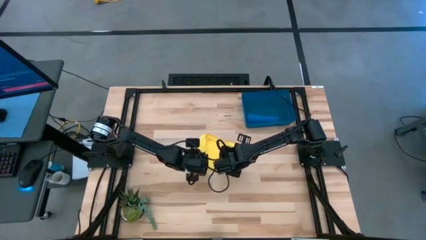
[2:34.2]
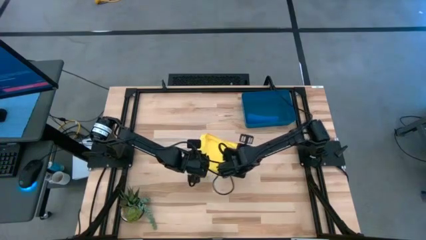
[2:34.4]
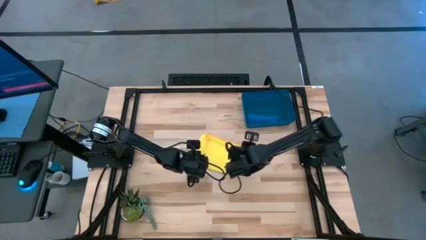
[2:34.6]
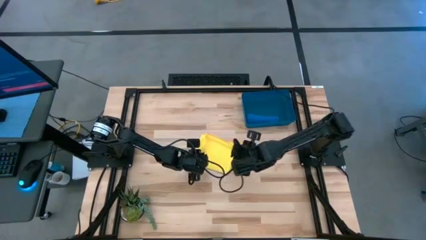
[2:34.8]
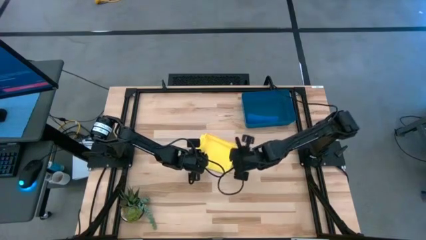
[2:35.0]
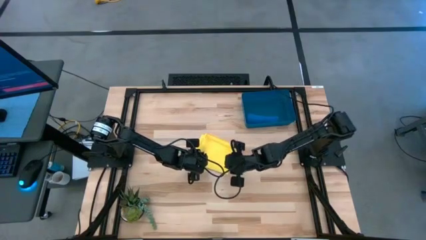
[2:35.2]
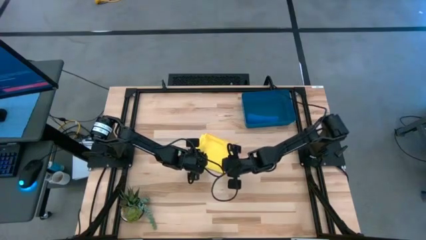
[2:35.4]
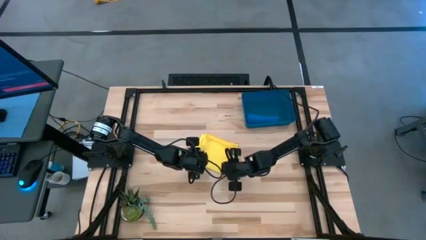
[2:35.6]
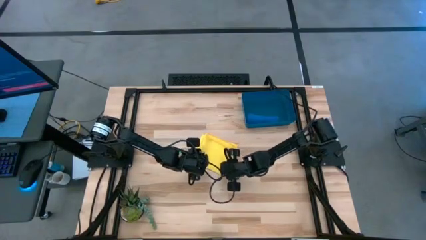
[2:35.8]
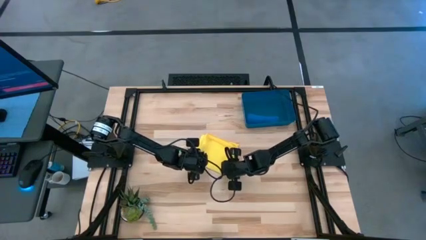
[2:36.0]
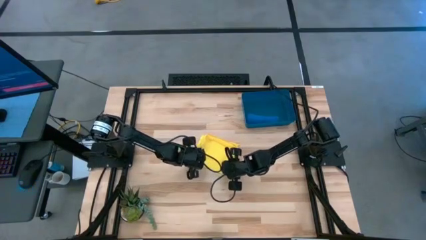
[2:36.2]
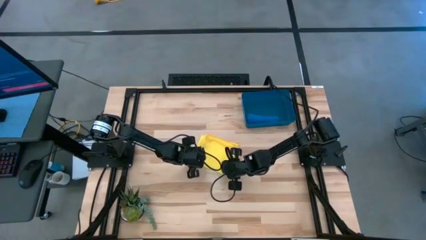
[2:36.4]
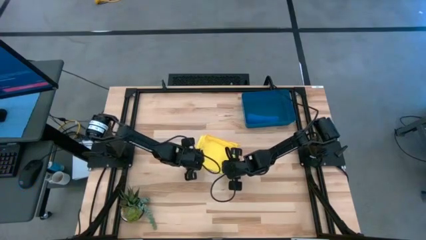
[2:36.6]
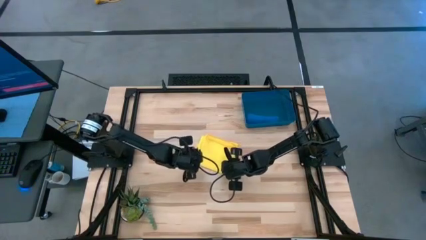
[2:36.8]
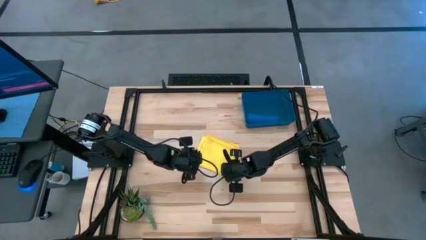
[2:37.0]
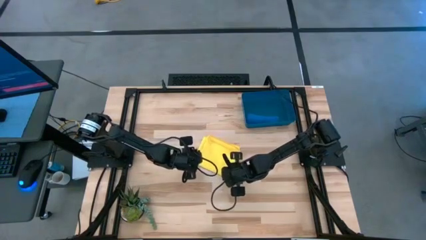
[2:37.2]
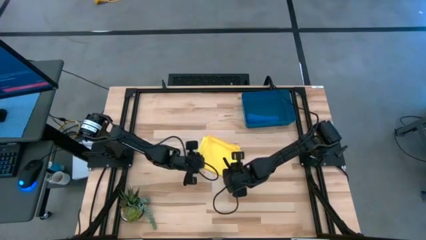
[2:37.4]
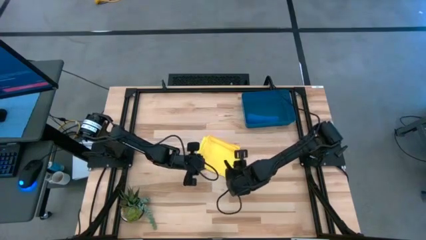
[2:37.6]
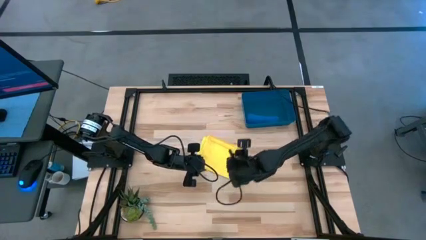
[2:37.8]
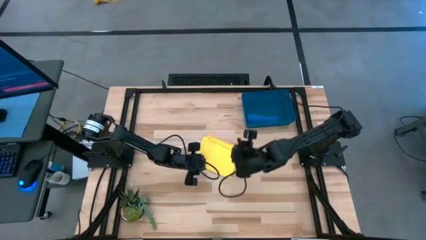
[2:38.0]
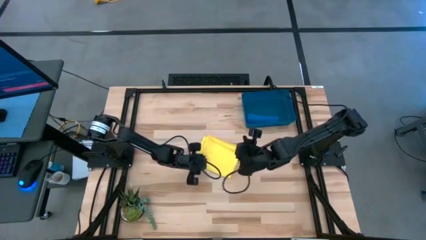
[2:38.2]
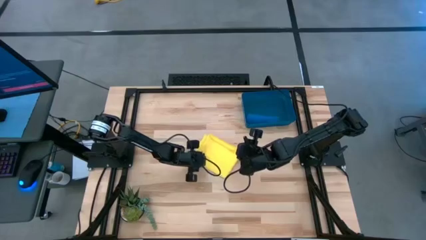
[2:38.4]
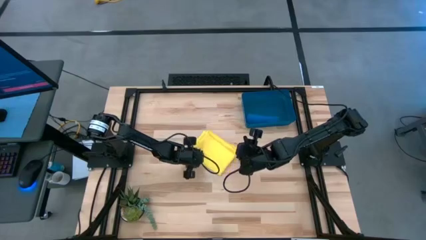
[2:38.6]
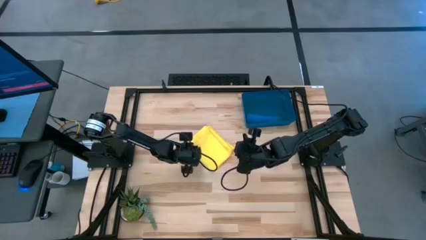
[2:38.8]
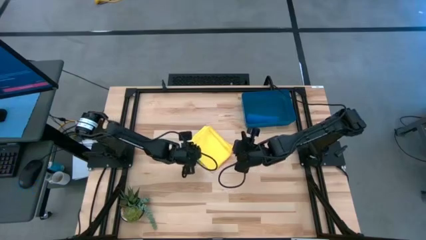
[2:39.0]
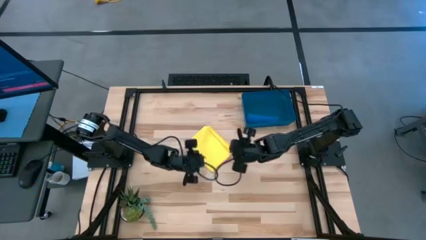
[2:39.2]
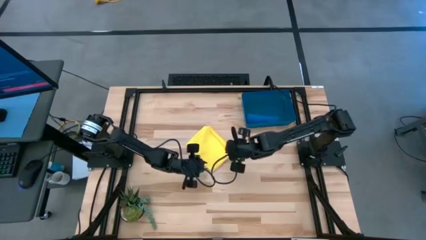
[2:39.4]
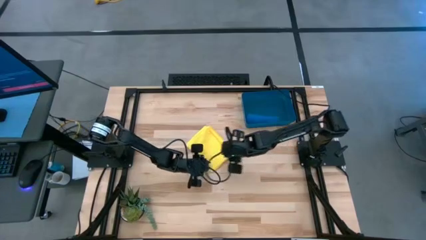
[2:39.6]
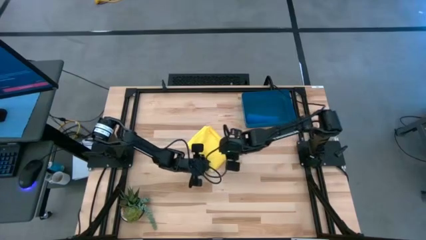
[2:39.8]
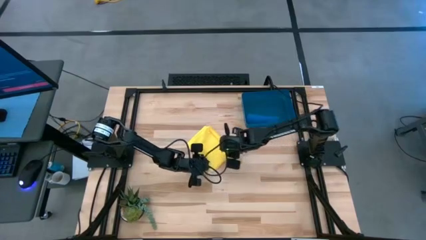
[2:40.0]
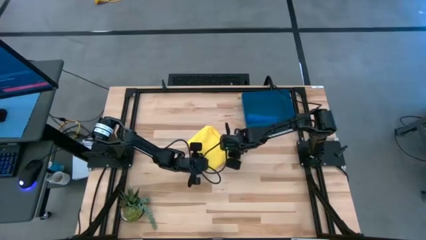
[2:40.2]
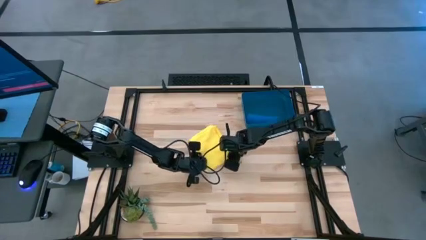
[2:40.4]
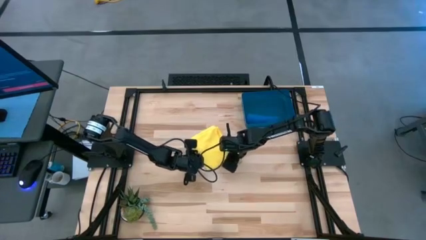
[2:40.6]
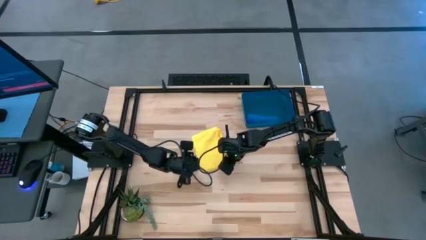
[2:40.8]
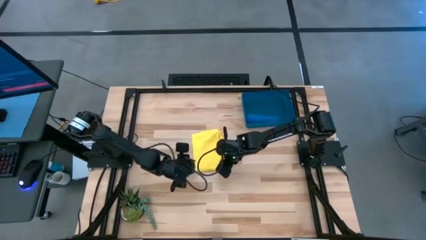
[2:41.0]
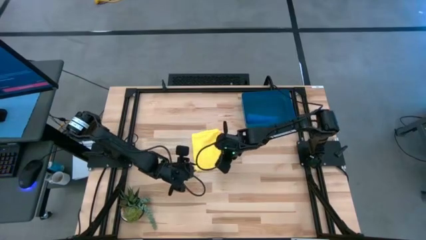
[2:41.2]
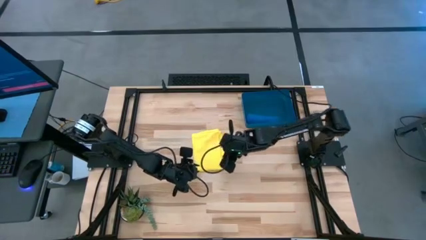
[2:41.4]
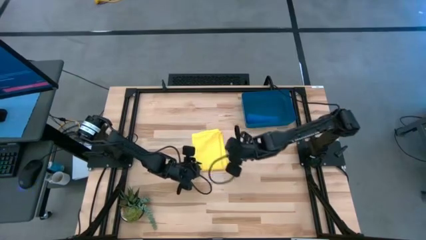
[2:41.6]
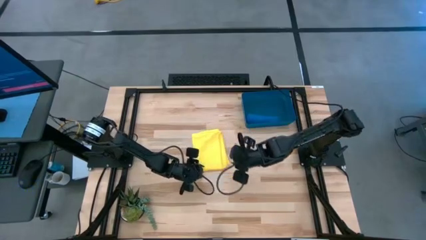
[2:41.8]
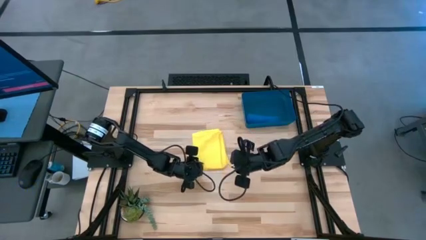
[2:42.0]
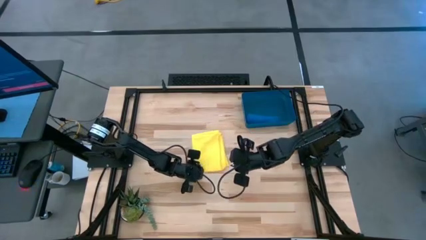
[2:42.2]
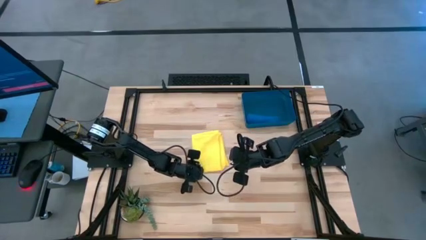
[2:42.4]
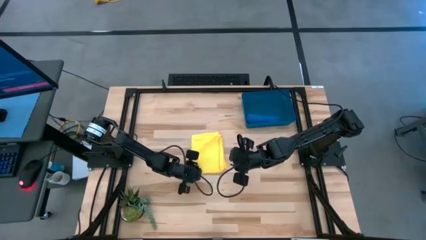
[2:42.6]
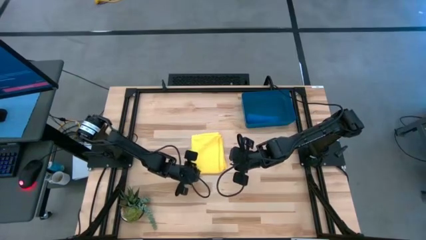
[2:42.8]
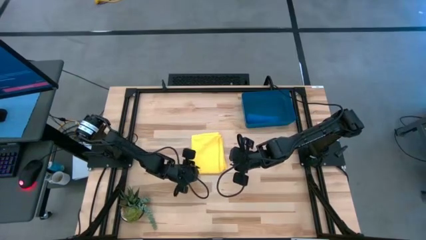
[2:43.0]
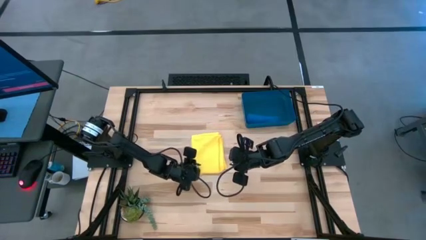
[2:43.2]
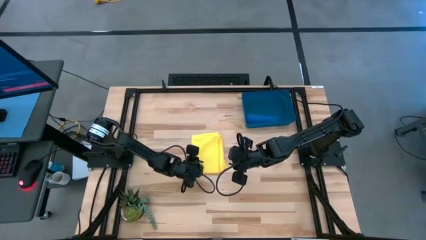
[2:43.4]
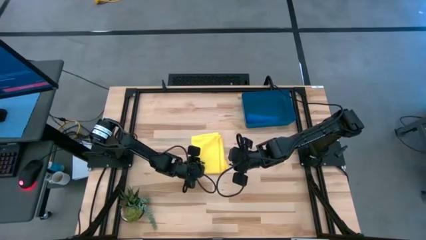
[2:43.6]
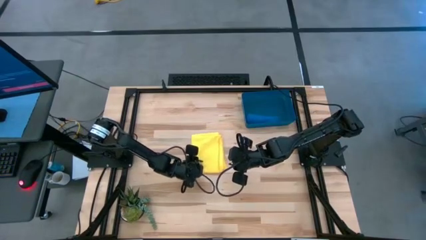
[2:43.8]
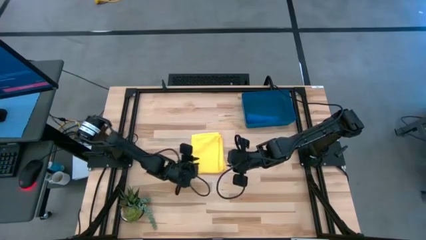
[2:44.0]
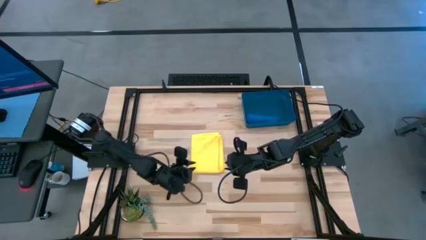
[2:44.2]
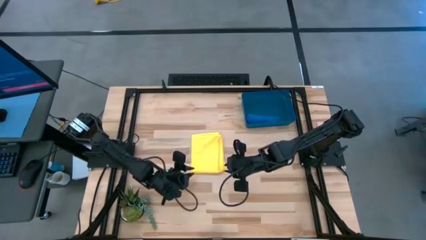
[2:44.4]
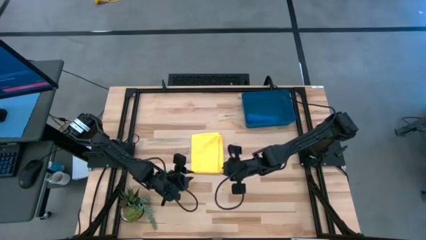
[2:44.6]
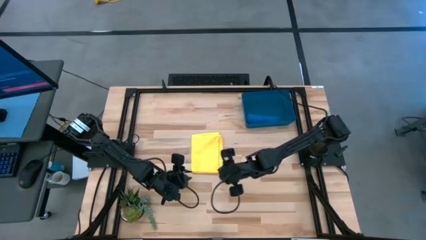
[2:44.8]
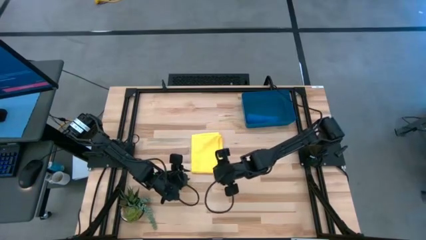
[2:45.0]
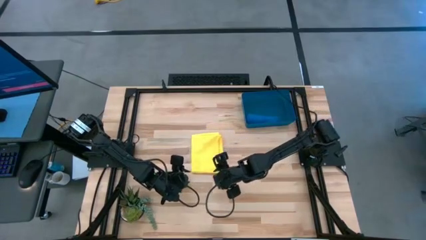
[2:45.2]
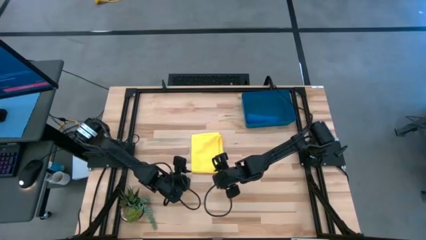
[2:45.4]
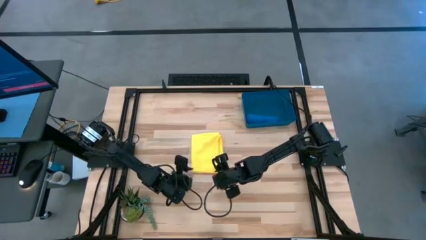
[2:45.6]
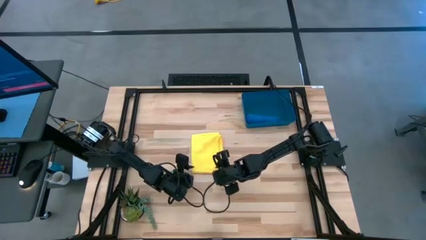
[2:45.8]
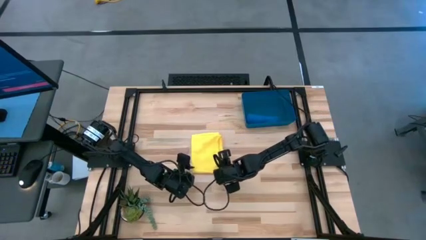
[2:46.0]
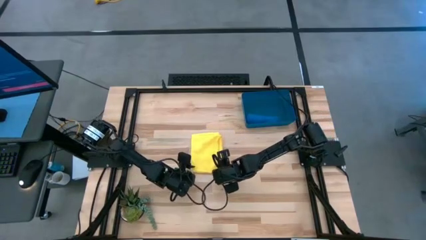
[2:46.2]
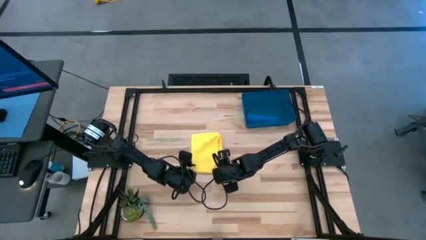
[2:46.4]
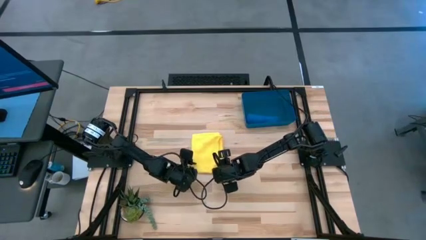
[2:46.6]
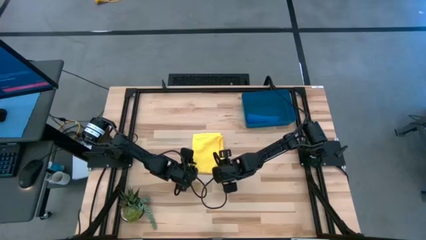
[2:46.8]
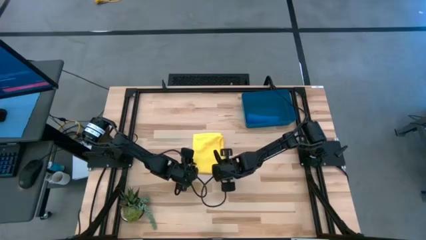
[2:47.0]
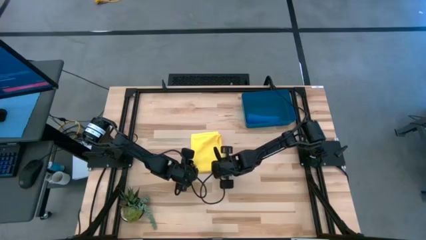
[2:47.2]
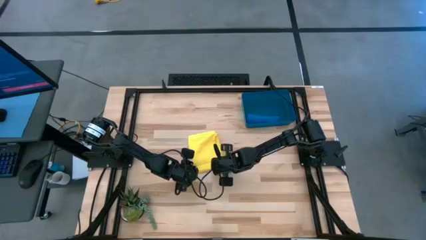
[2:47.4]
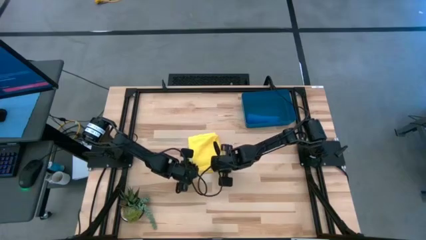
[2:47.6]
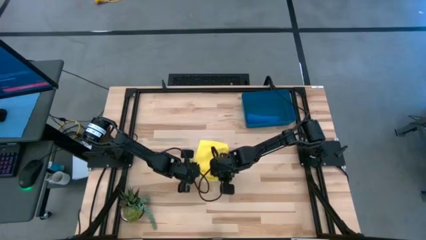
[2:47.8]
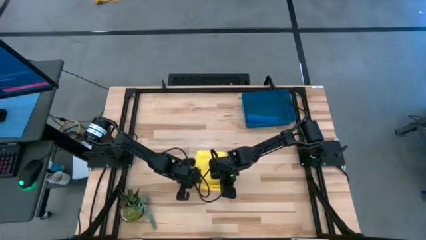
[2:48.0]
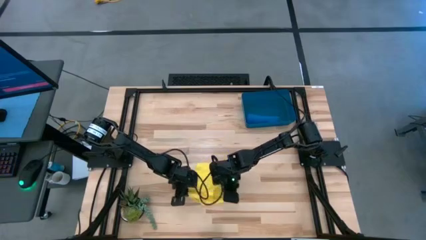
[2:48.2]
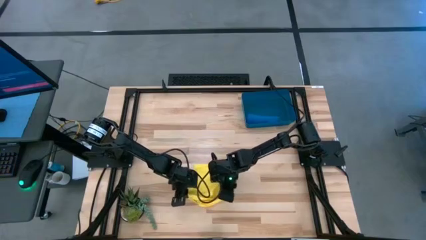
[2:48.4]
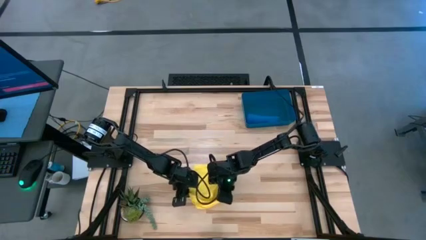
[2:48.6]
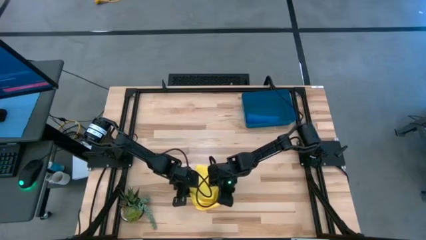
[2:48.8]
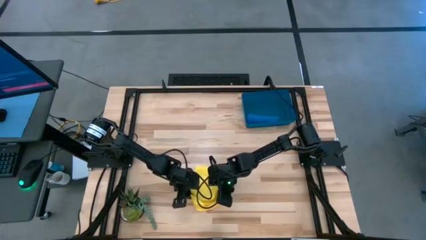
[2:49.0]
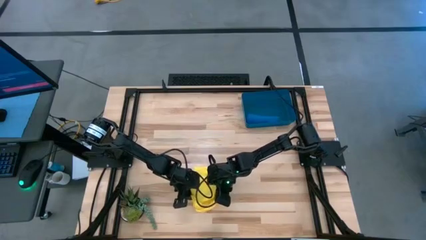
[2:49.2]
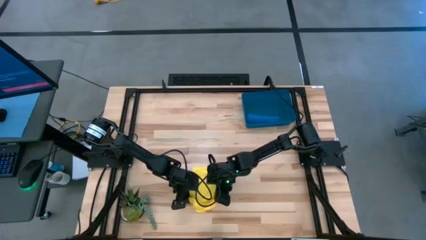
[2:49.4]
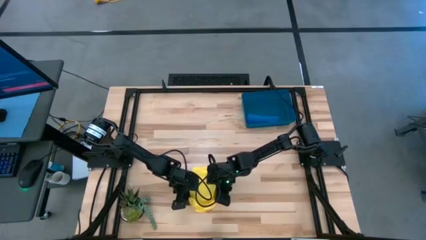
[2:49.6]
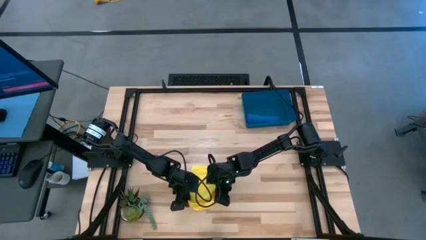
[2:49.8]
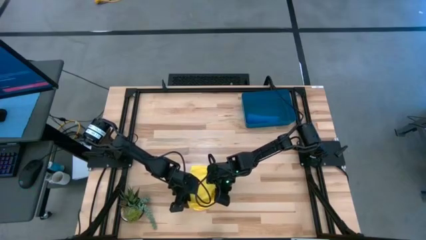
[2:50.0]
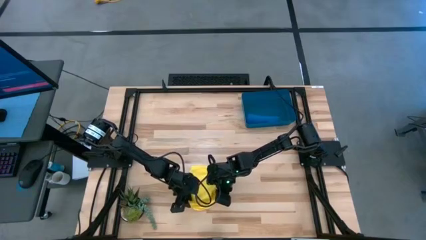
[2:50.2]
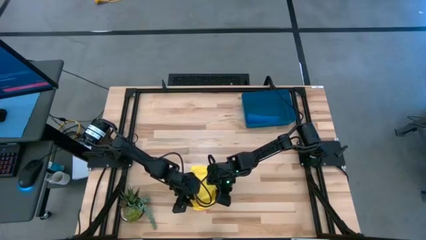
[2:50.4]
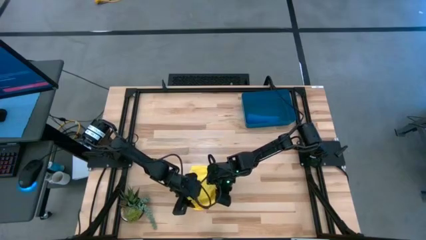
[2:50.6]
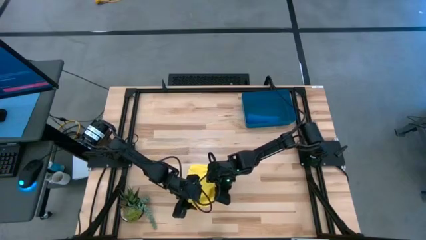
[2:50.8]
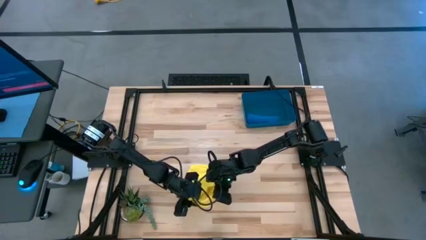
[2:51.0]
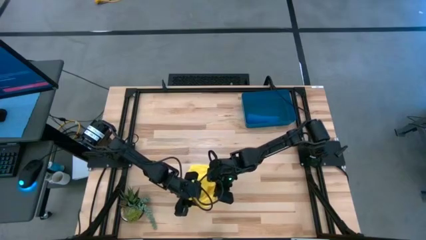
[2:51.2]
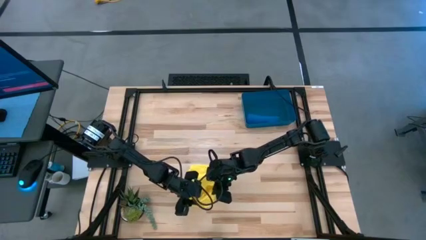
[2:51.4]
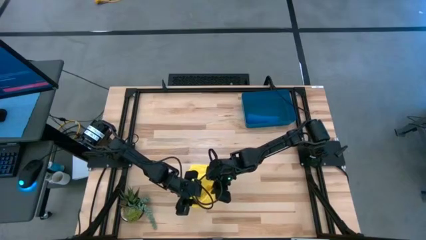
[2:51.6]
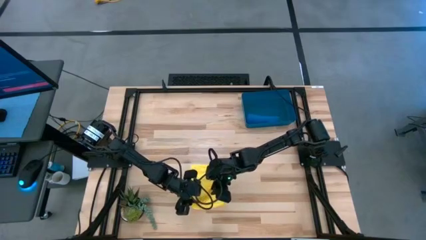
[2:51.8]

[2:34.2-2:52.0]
Task: Roll microfiber towels into tight, uniform cylinder then place into a basket
Roll the yellow microfiber cloth
